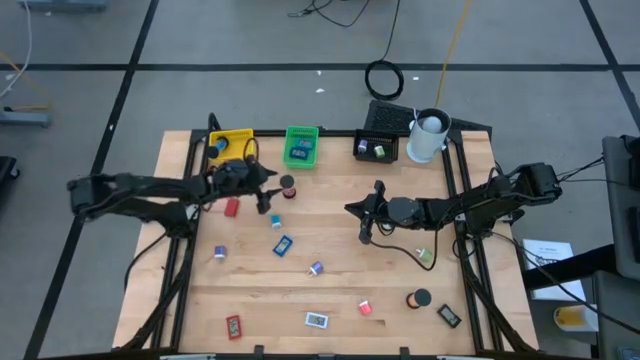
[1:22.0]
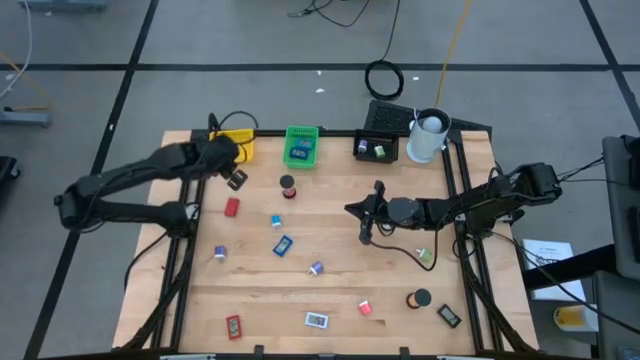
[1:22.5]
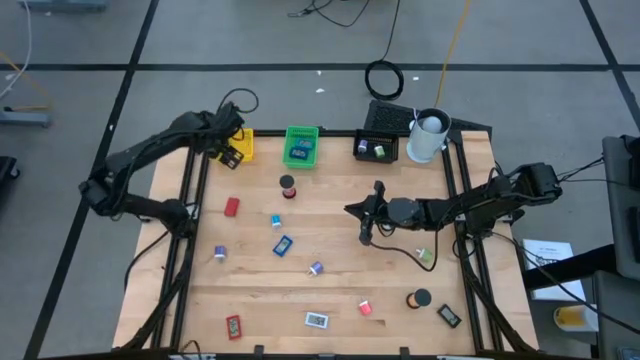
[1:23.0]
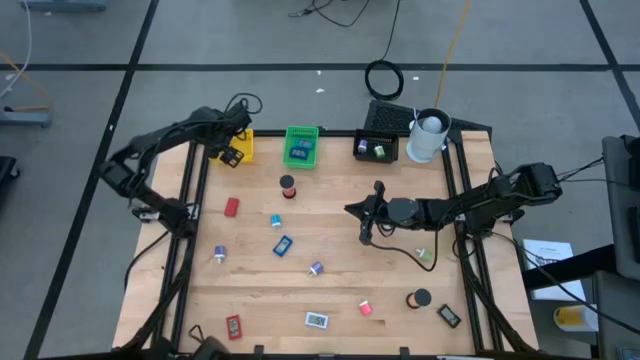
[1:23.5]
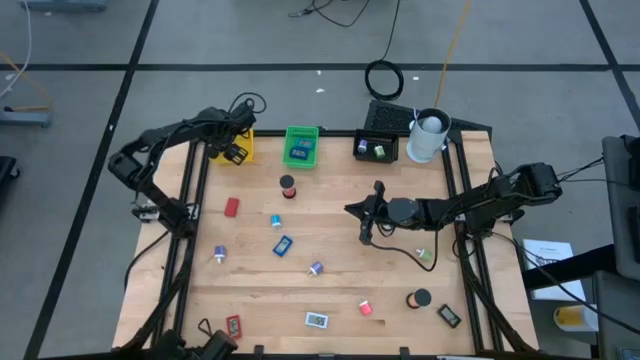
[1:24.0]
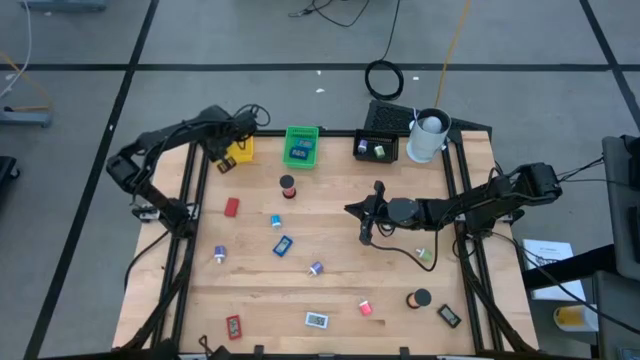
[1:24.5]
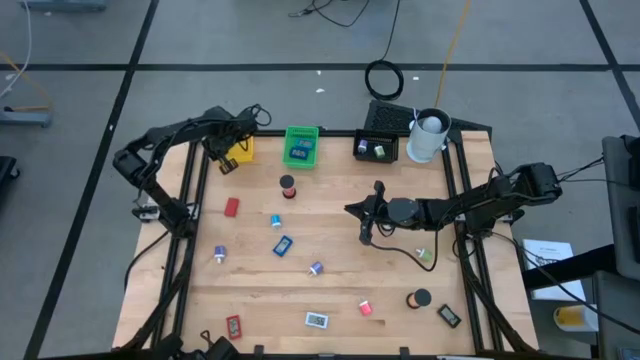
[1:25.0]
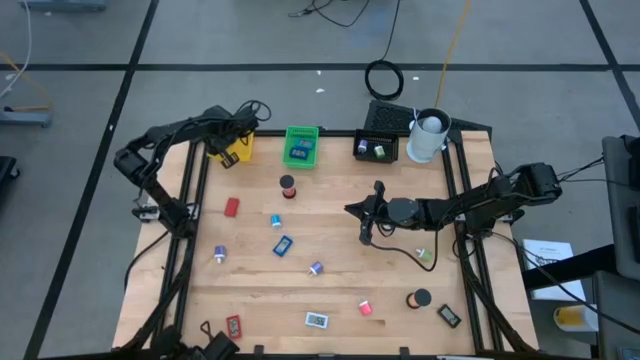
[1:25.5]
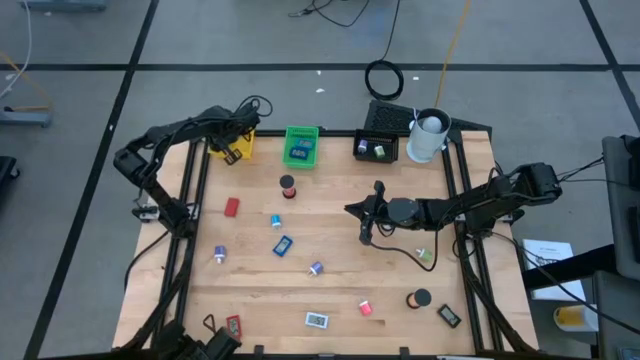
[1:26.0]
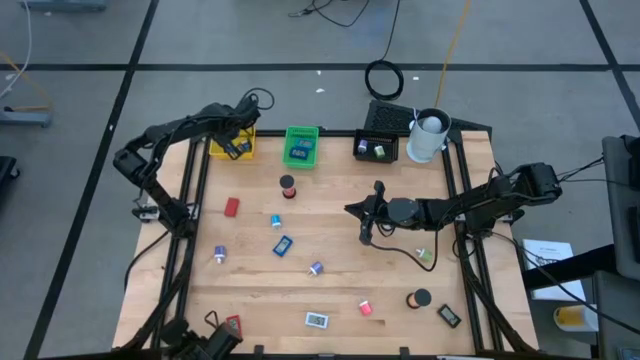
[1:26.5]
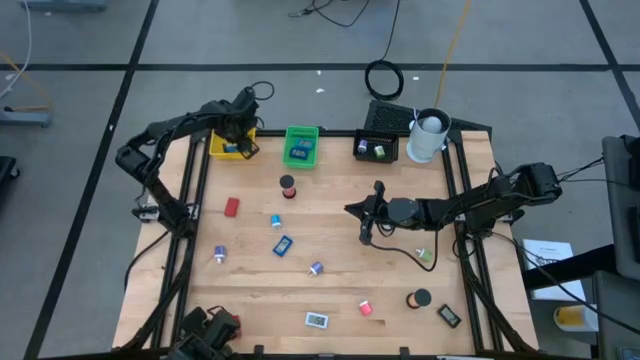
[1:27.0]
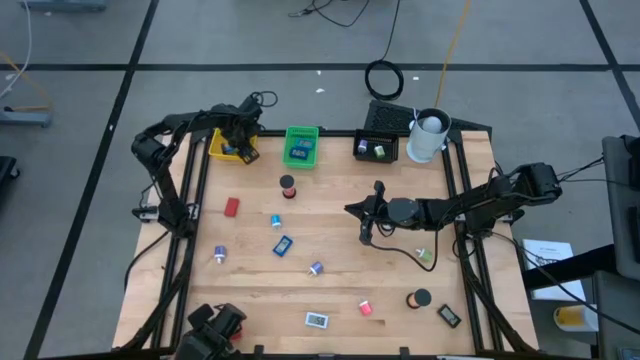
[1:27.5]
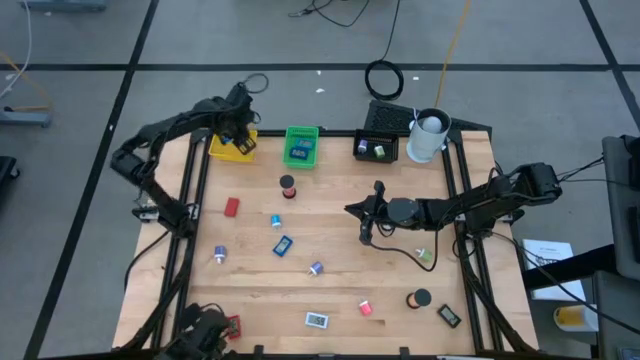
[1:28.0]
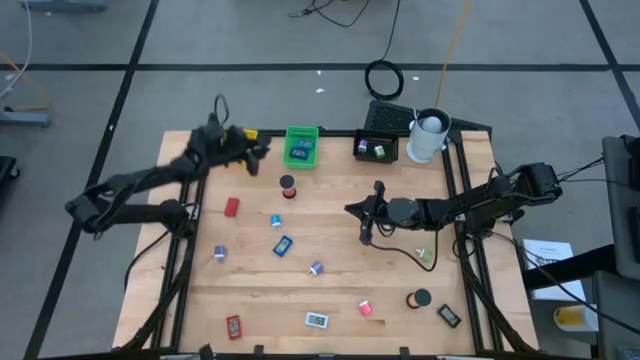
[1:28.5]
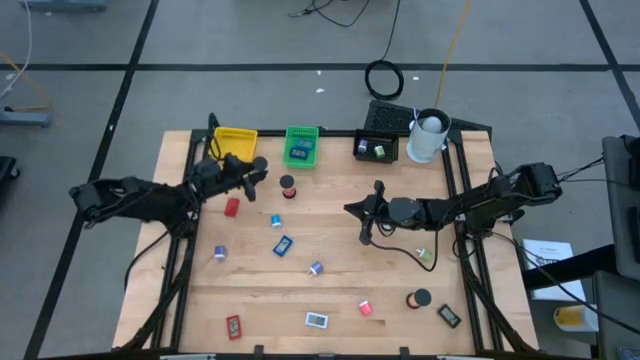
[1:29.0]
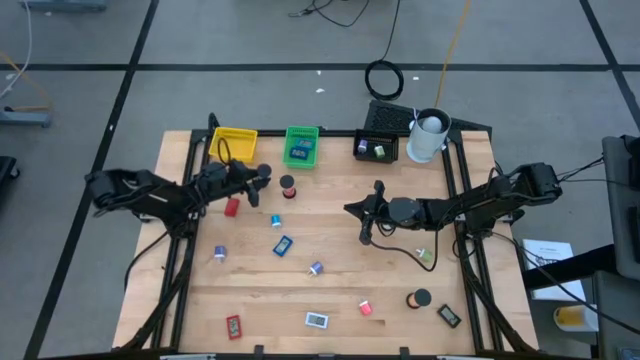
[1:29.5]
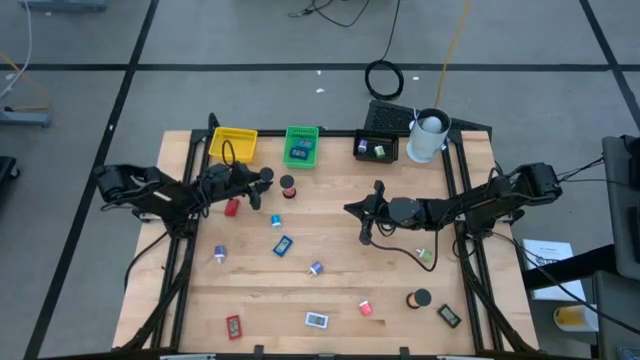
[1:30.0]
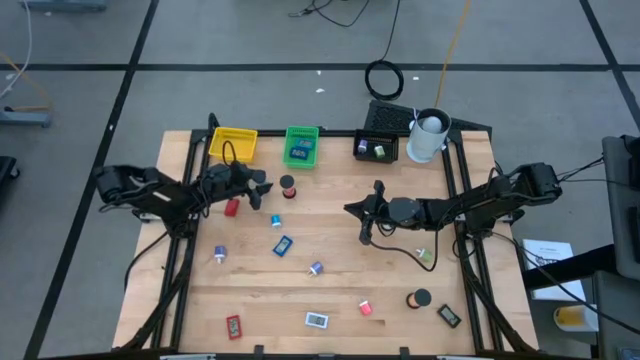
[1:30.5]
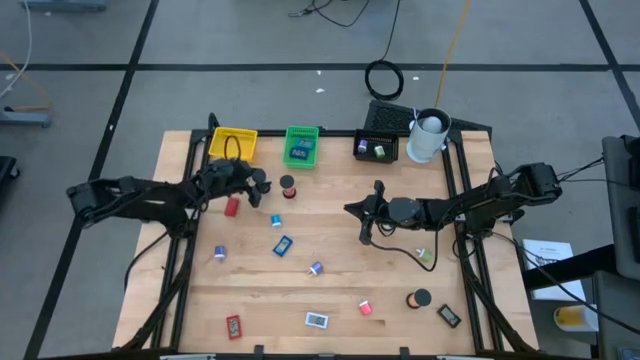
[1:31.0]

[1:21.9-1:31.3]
Task: Pick & Place Office items
Remove the blue sand timer from the yellow bin

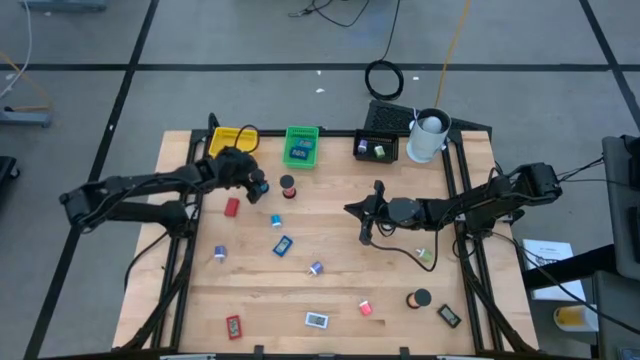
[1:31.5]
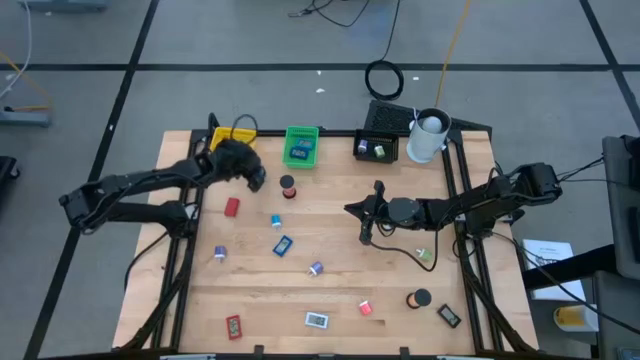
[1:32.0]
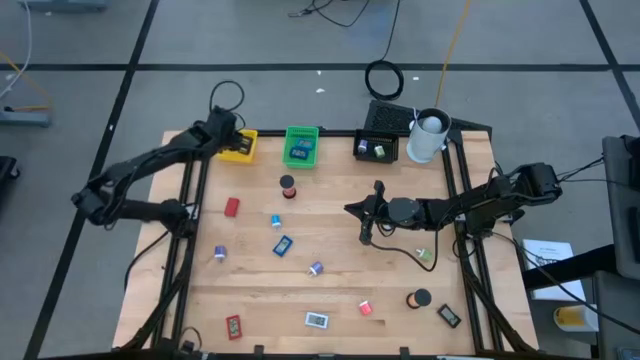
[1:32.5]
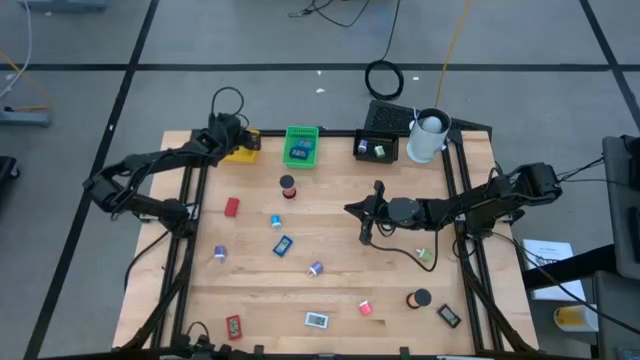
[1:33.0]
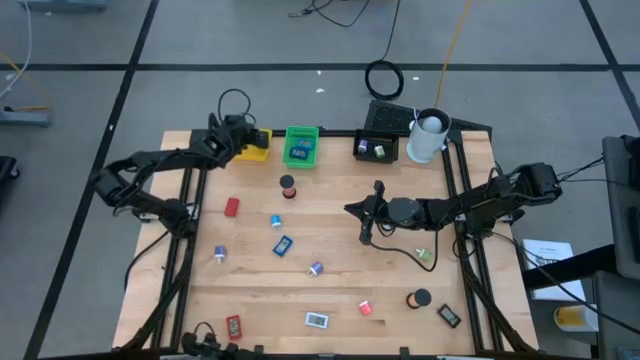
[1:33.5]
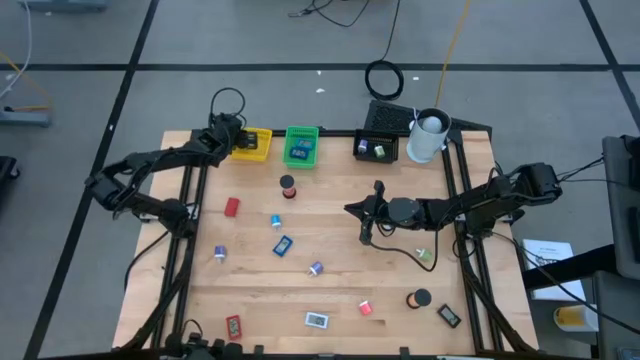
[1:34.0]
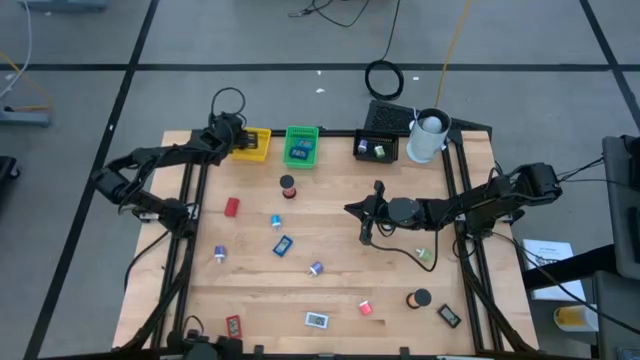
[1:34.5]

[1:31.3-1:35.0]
Put the blue sand timer into the yellow bin

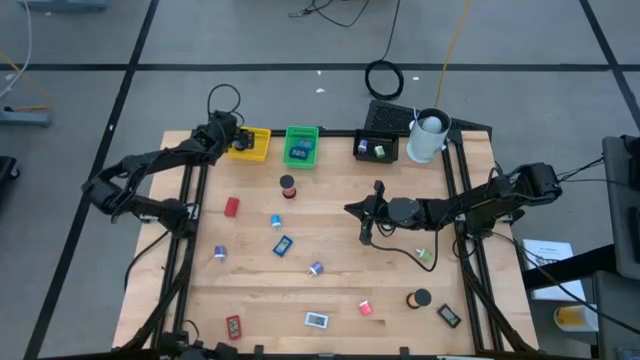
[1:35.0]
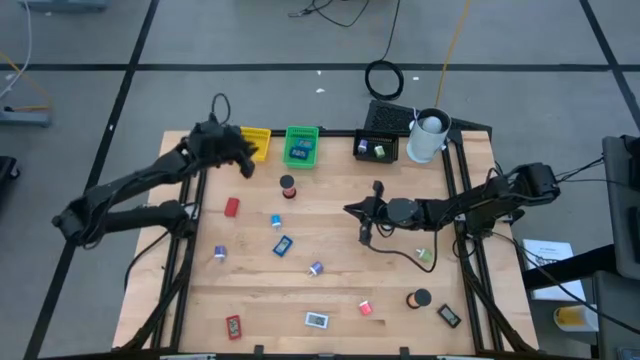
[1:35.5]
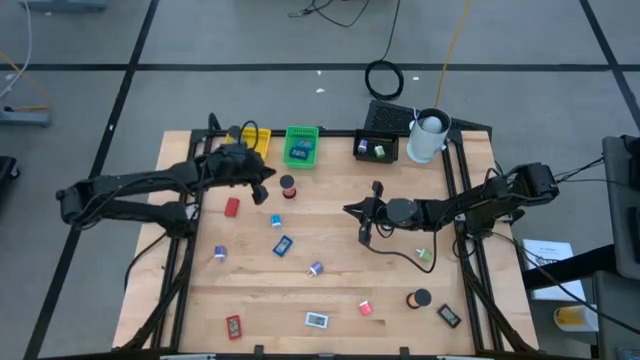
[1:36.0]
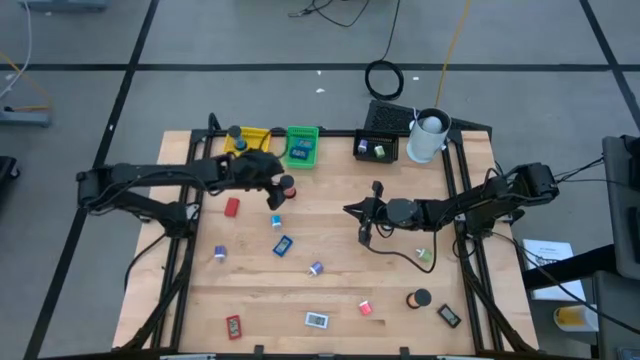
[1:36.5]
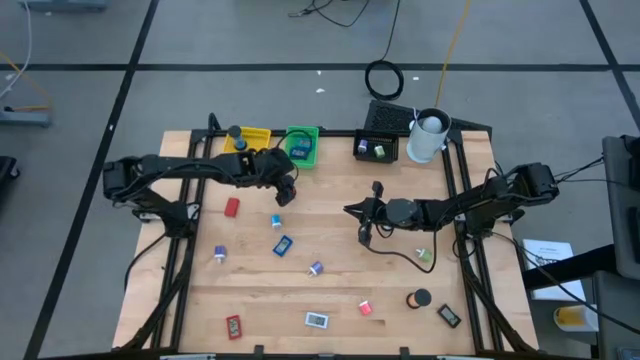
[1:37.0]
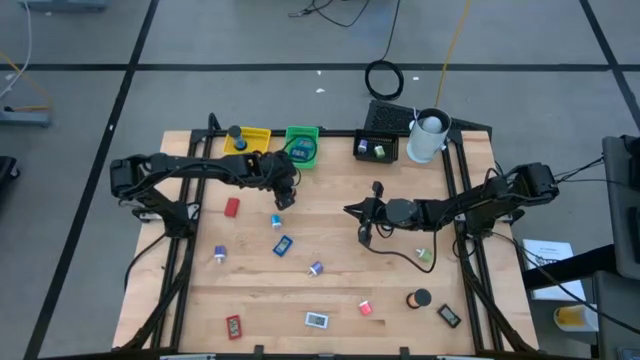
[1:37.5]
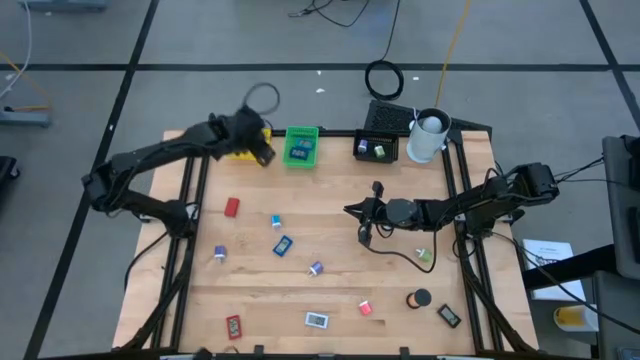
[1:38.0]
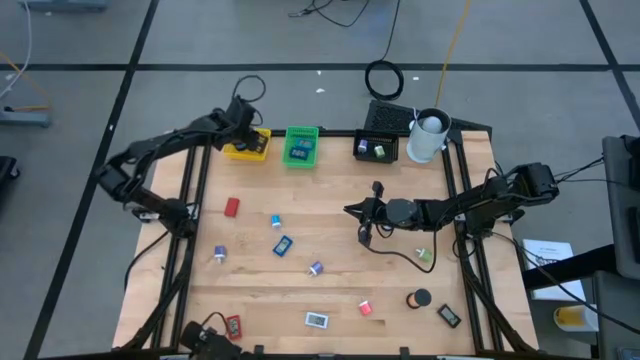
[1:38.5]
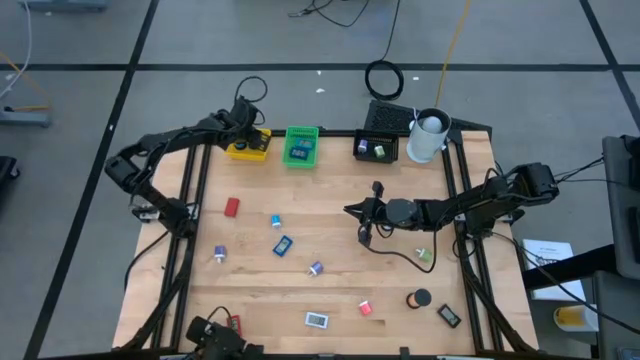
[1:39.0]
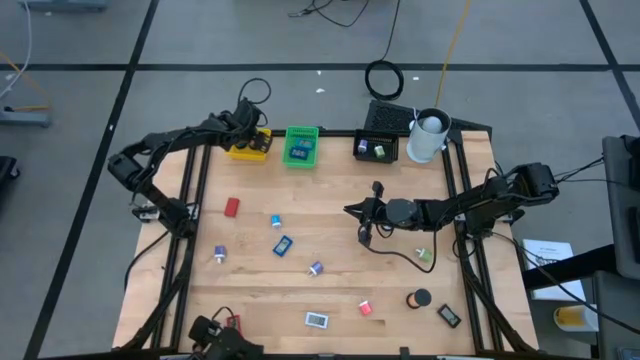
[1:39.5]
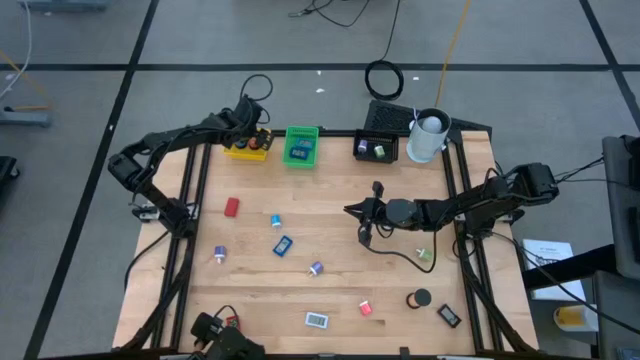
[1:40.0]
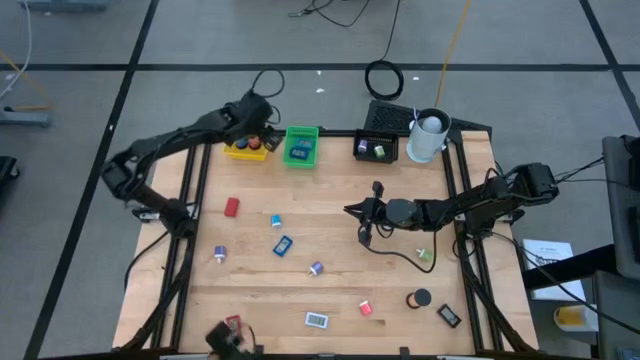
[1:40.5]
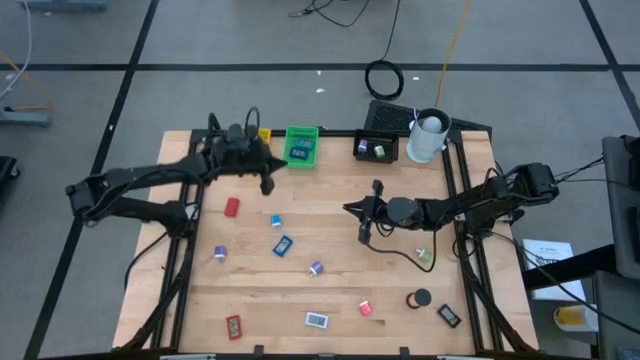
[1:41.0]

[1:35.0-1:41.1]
Put the red sand timer into the yellow bin

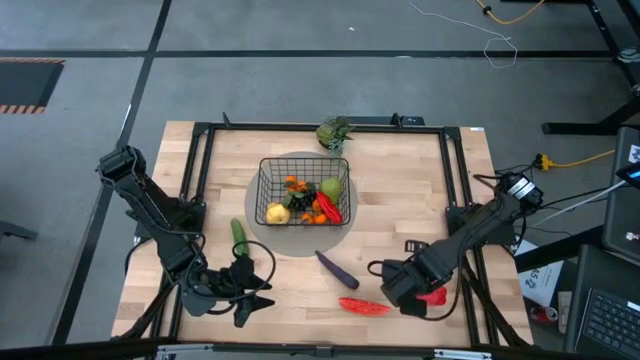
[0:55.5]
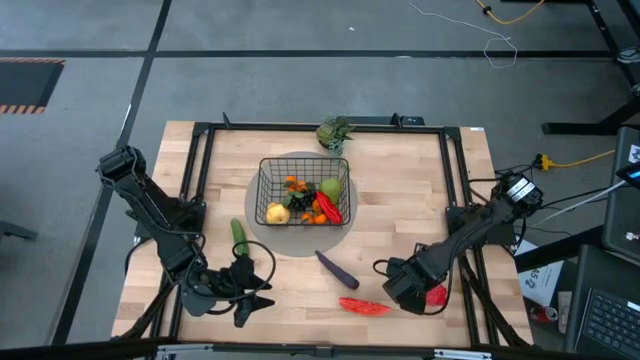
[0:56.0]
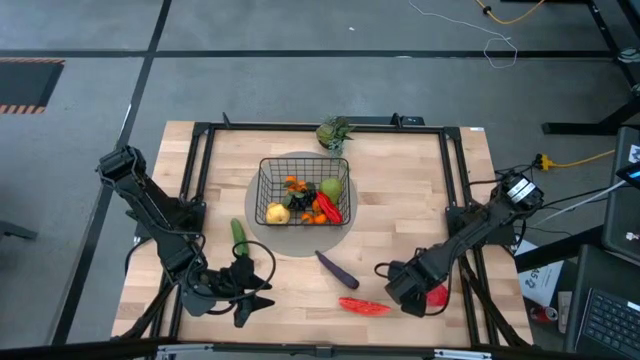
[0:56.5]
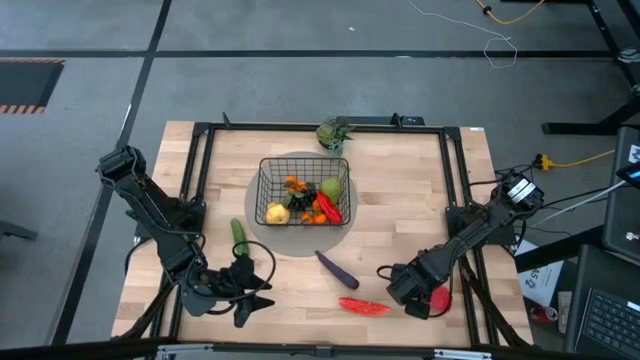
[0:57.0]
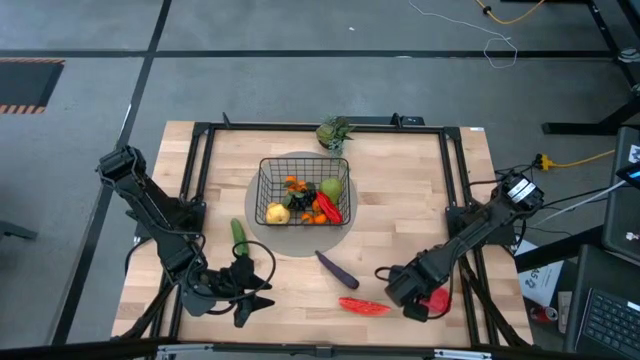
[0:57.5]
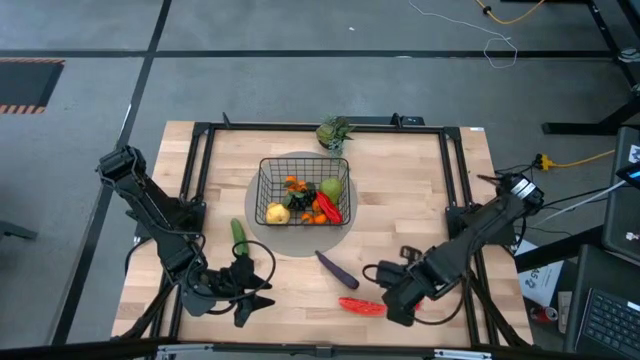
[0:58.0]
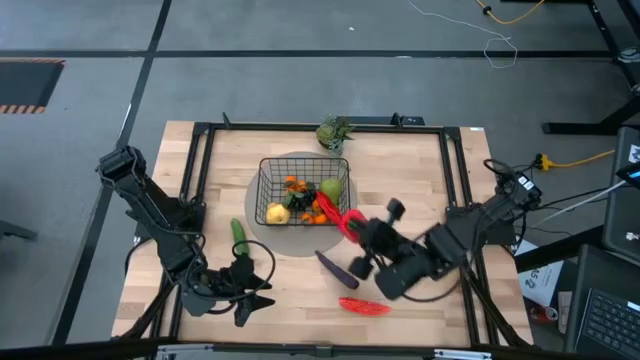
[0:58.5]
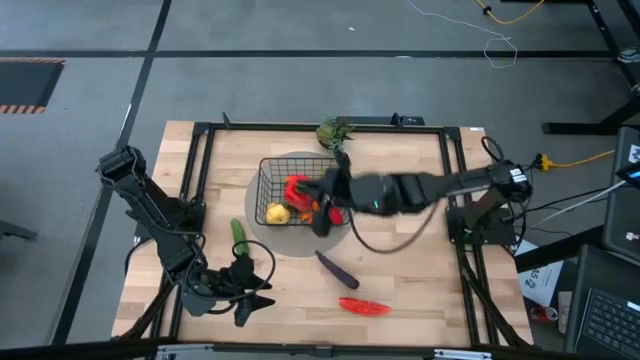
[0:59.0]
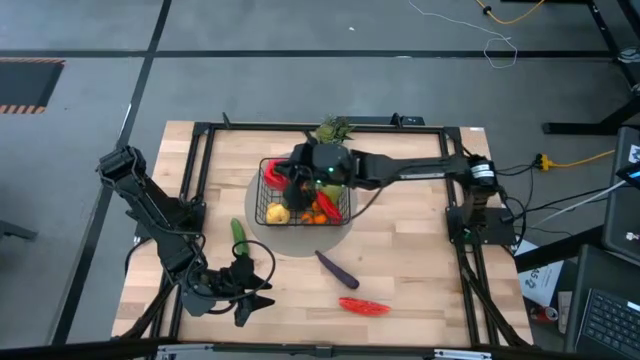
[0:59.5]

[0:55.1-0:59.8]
Task: Build produce basket
Put the red bell pepper into the black wire basket
